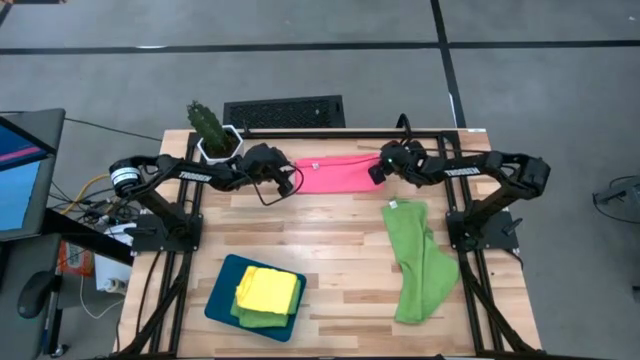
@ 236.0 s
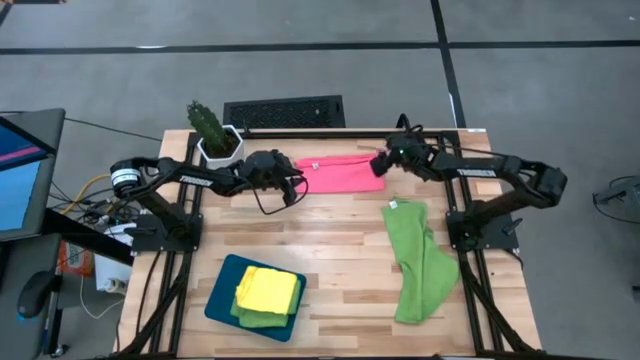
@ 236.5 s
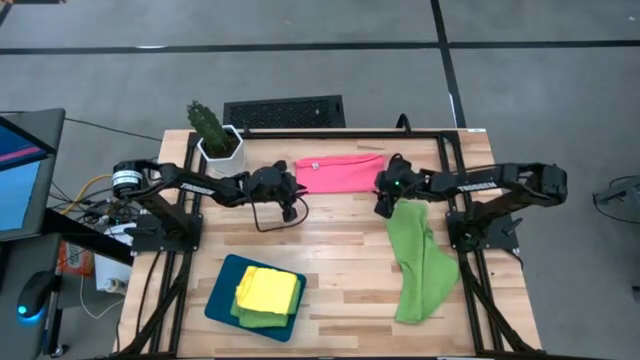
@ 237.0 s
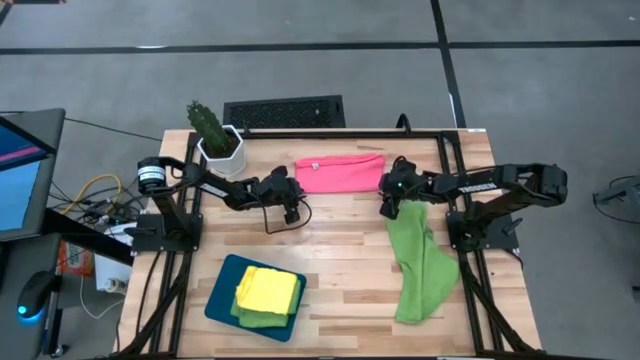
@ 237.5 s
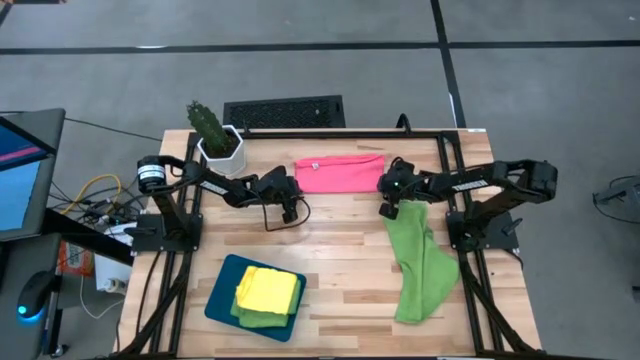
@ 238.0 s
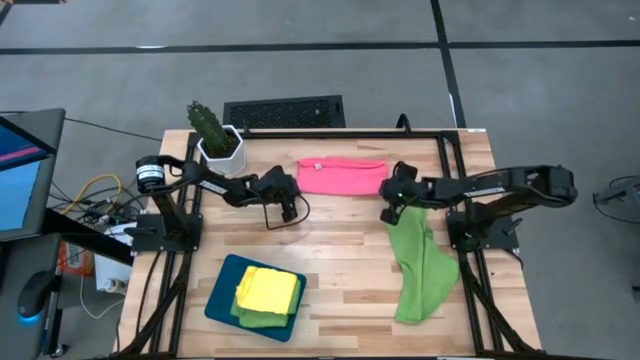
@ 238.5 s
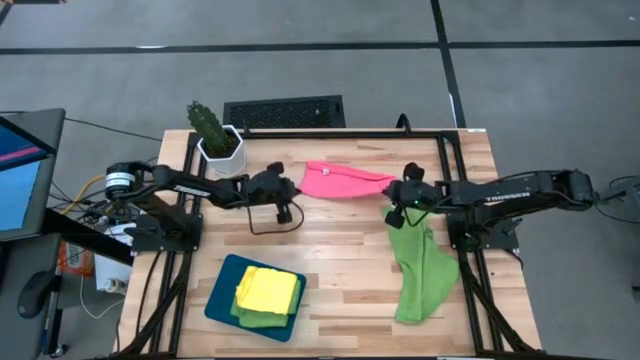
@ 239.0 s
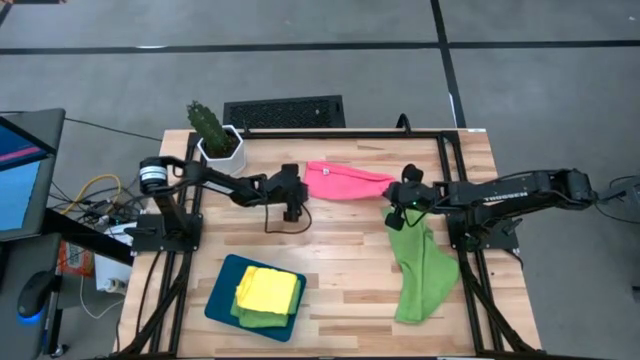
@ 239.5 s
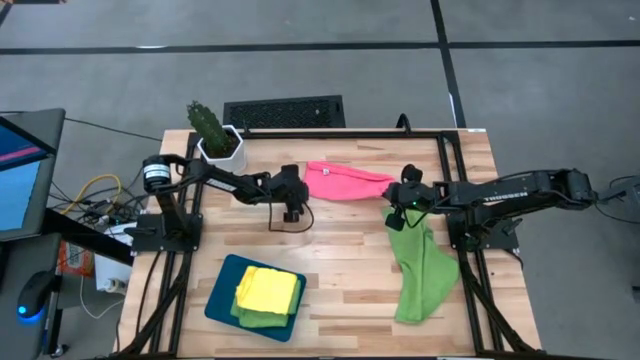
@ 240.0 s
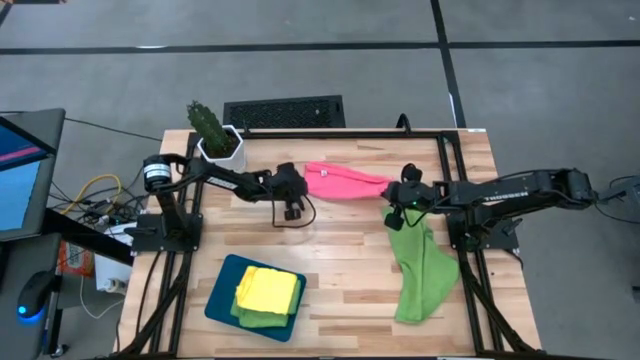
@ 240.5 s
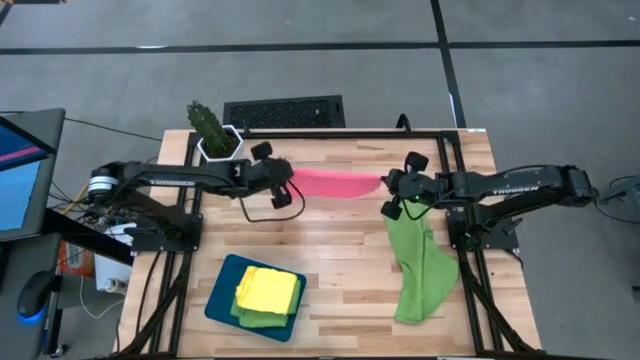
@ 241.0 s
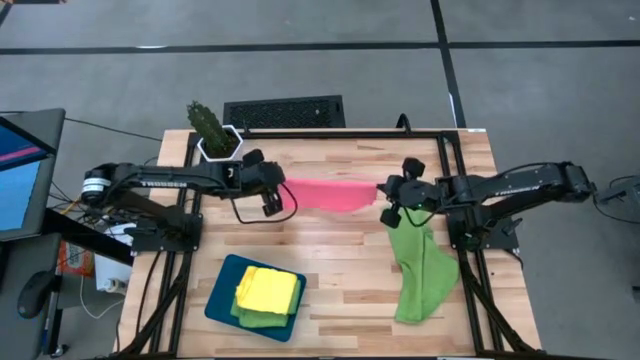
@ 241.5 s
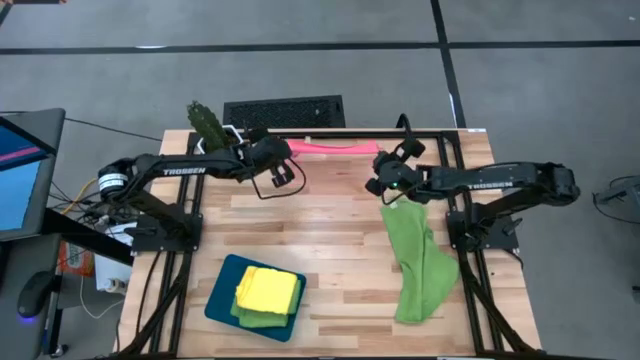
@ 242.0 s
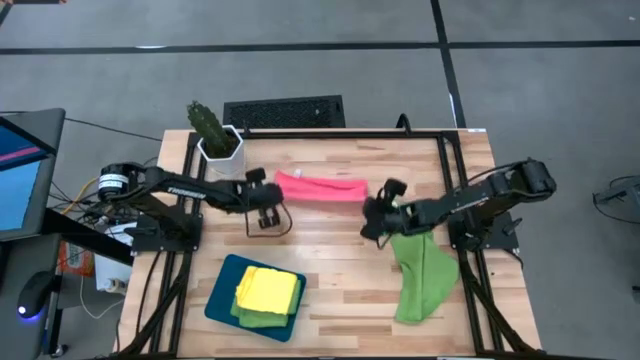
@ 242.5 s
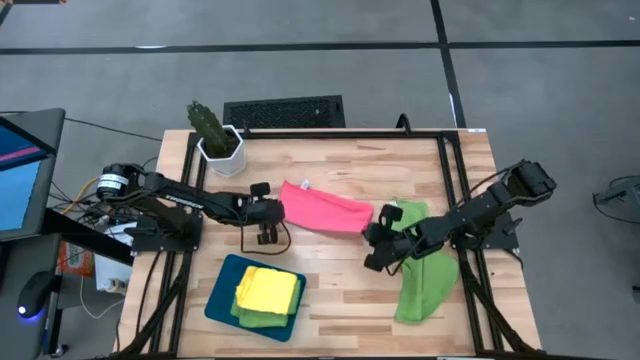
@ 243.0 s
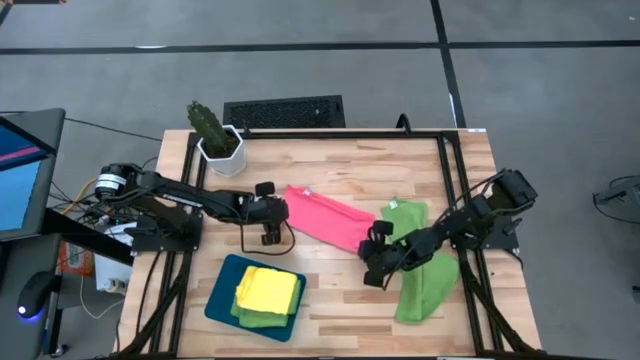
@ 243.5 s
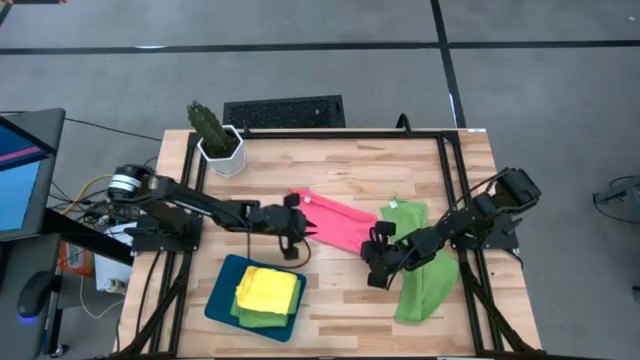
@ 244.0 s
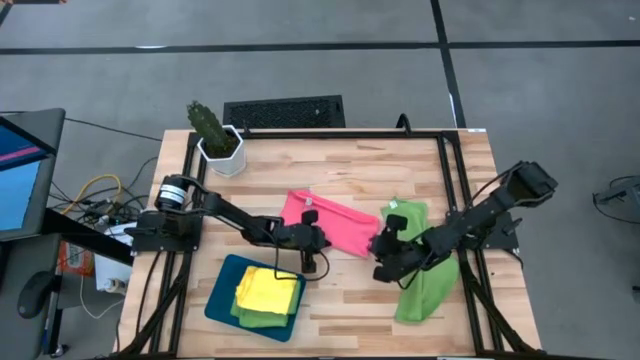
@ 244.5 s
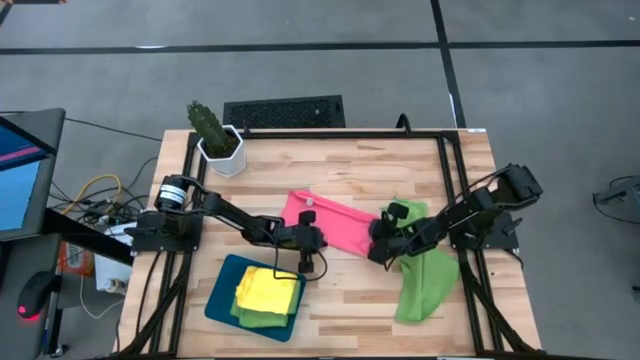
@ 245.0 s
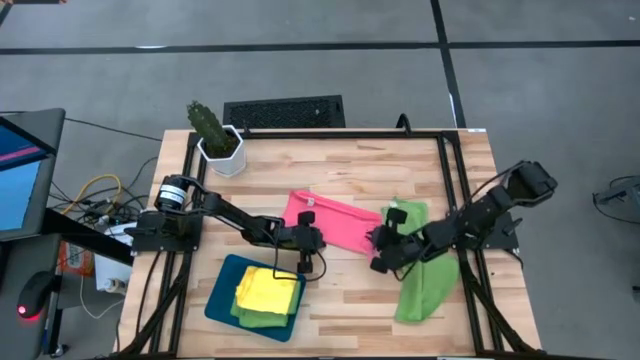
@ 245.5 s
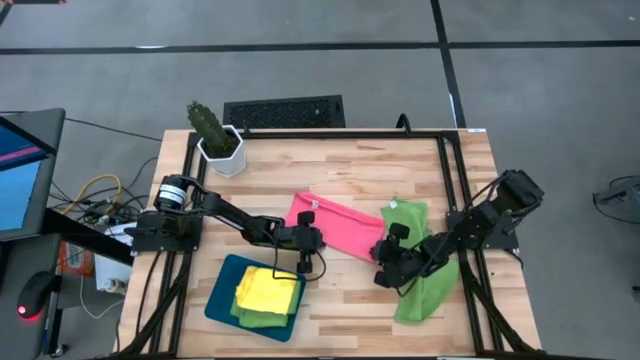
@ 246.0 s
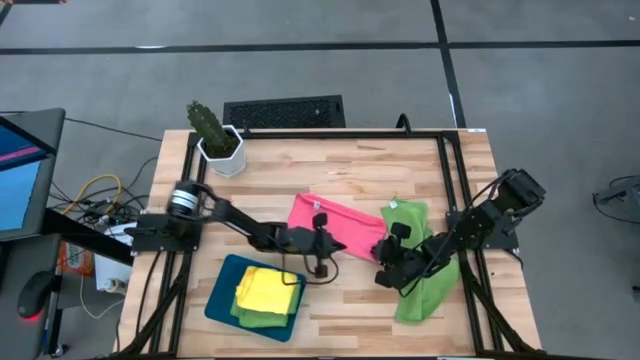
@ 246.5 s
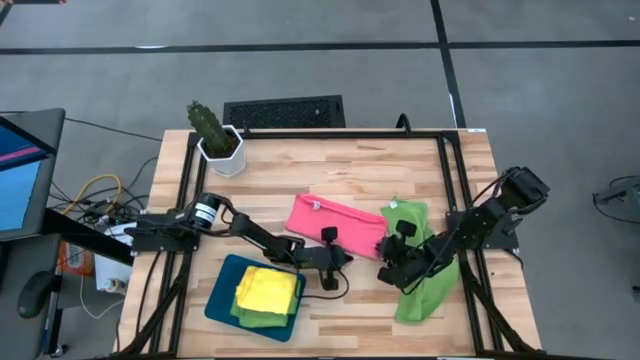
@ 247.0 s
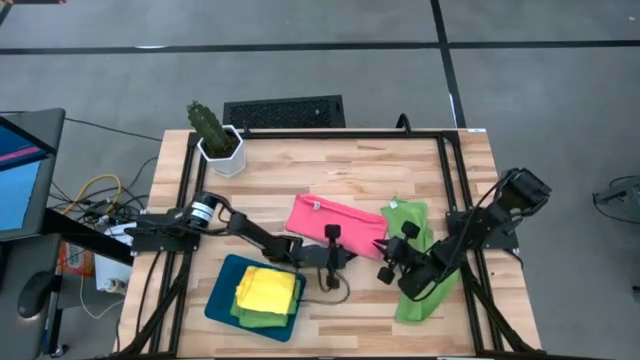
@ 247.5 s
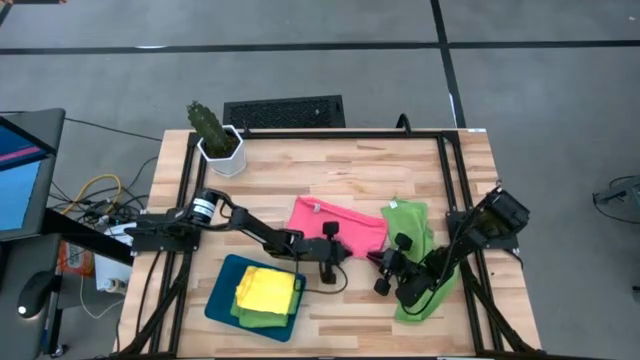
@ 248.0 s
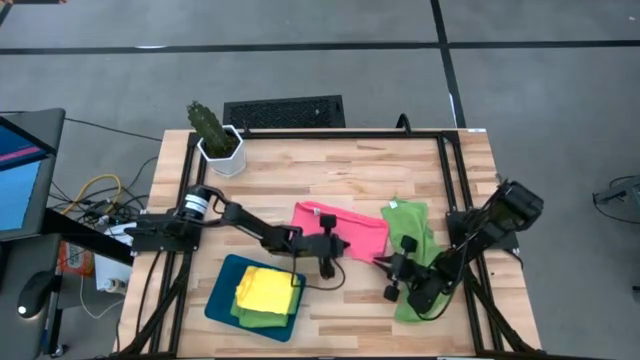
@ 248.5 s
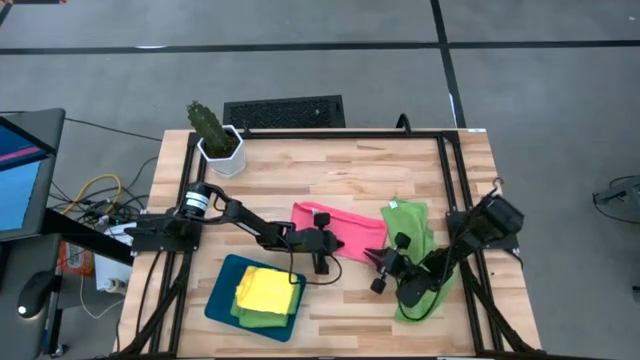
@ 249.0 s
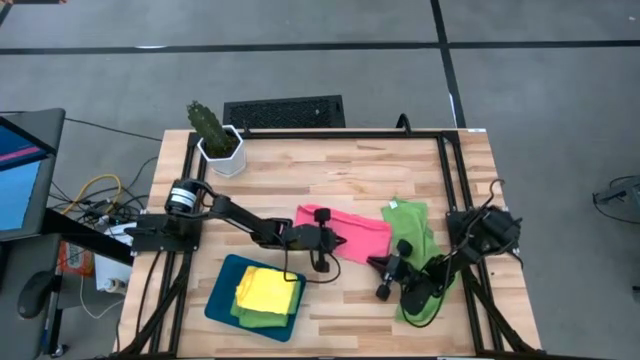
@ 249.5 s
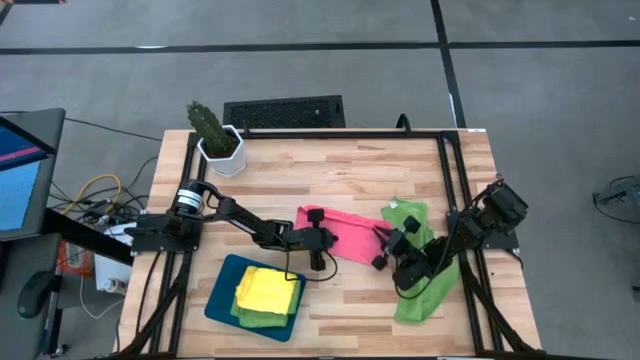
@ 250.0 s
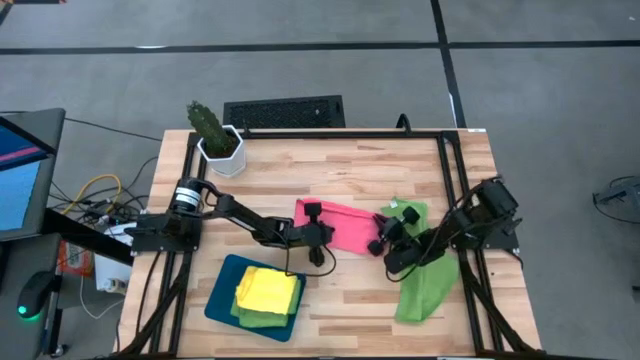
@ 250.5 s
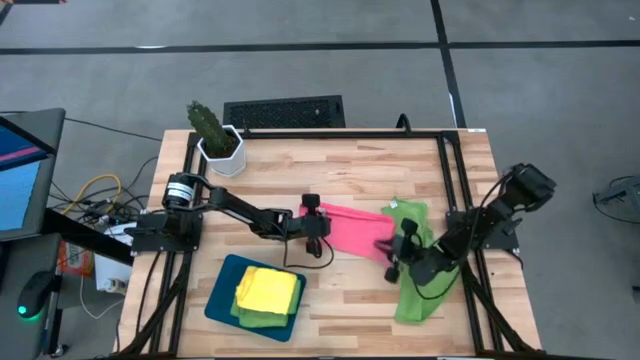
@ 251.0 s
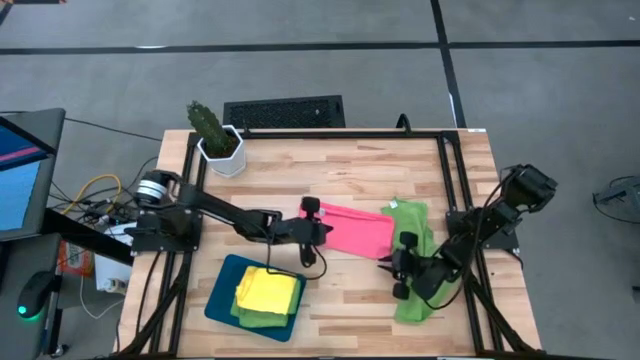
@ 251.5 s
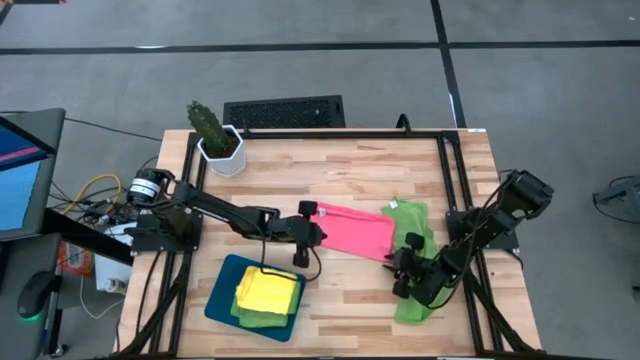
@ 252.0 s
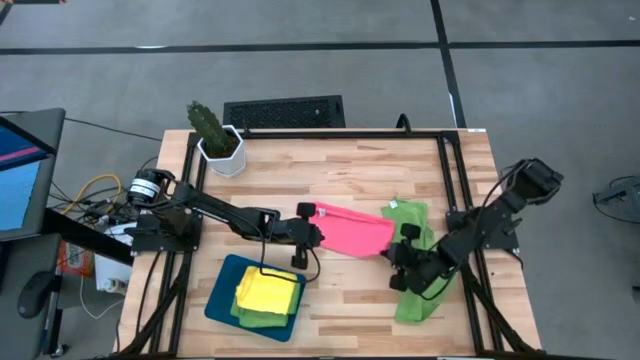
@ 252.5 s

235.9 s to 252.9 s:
Task: Fold microfiber towels
Fold the pink microfiber

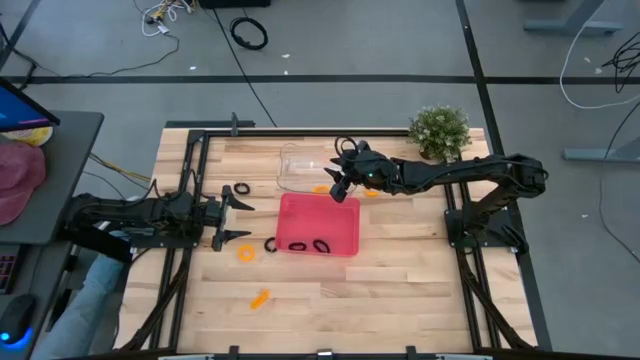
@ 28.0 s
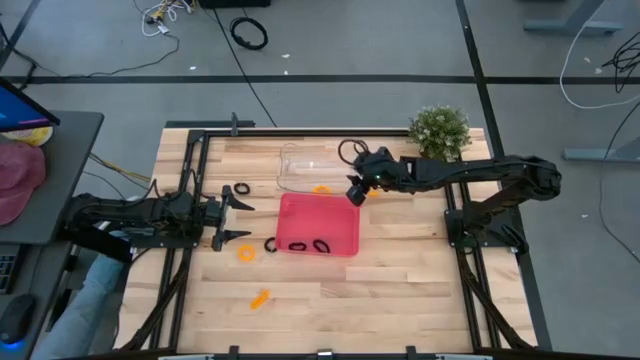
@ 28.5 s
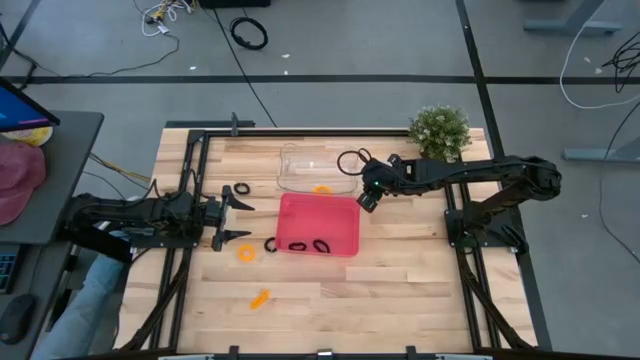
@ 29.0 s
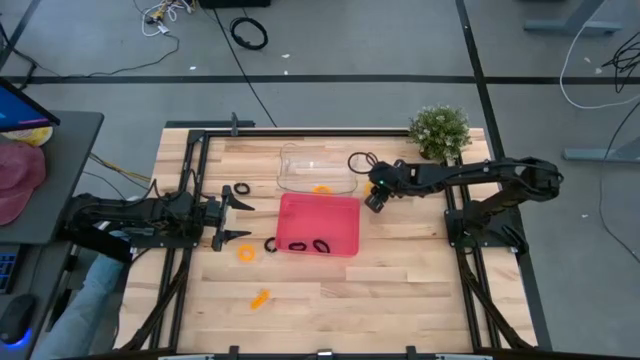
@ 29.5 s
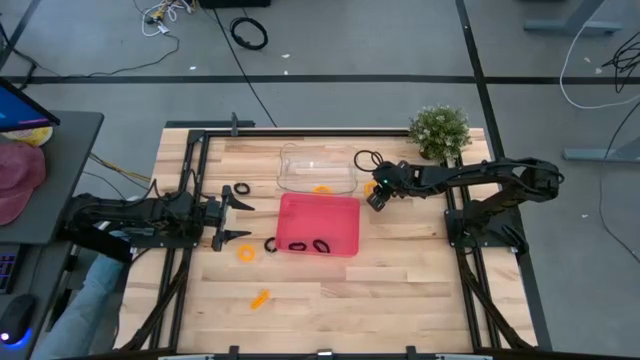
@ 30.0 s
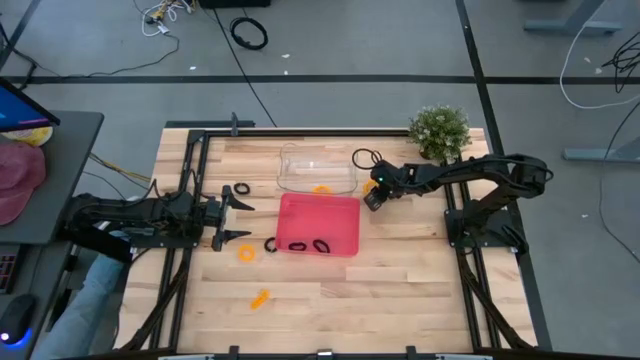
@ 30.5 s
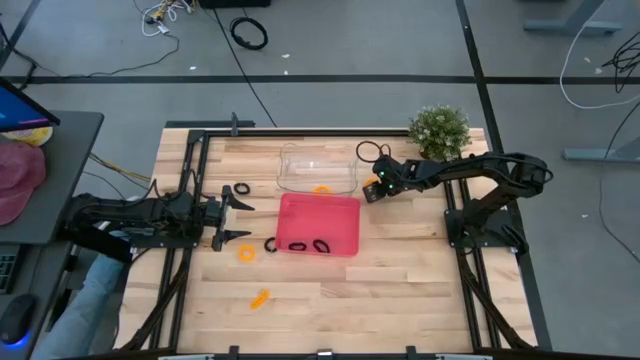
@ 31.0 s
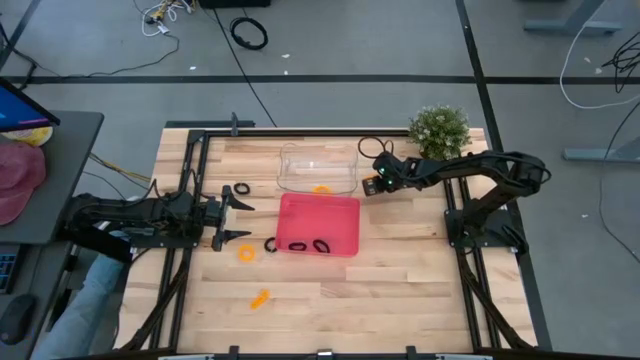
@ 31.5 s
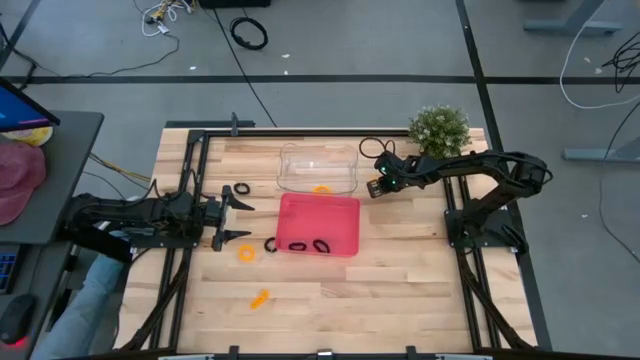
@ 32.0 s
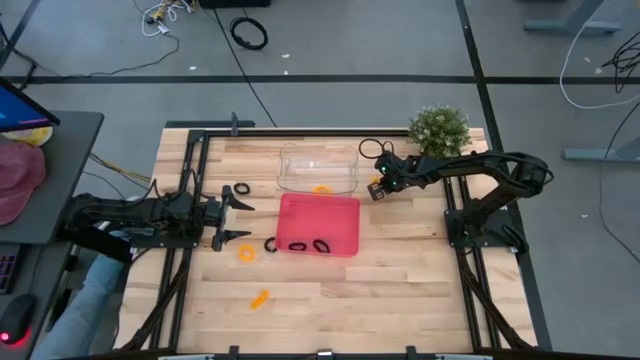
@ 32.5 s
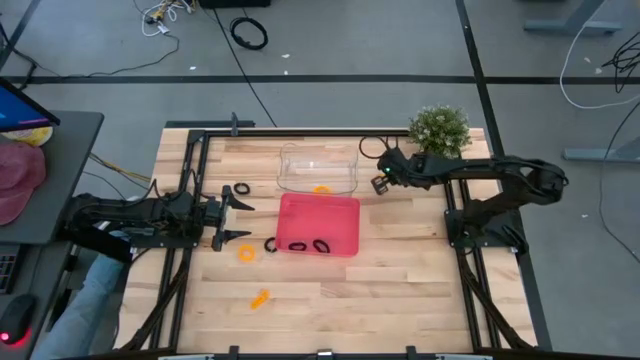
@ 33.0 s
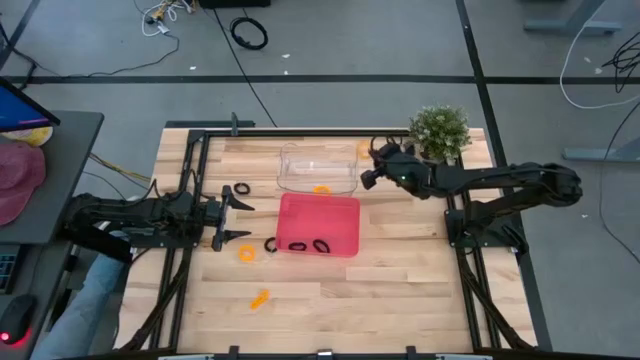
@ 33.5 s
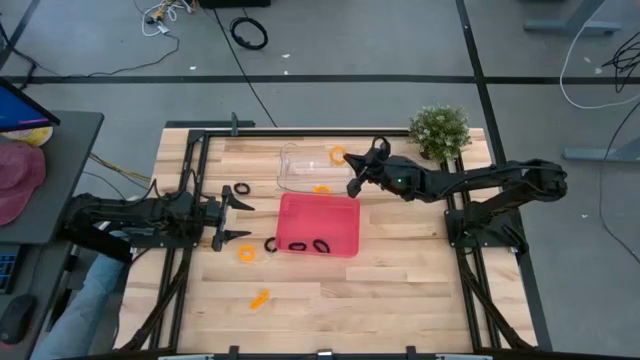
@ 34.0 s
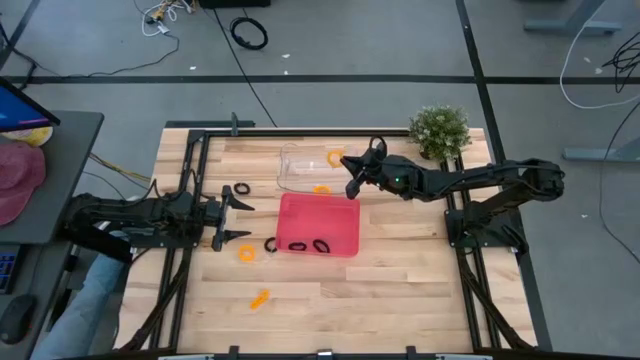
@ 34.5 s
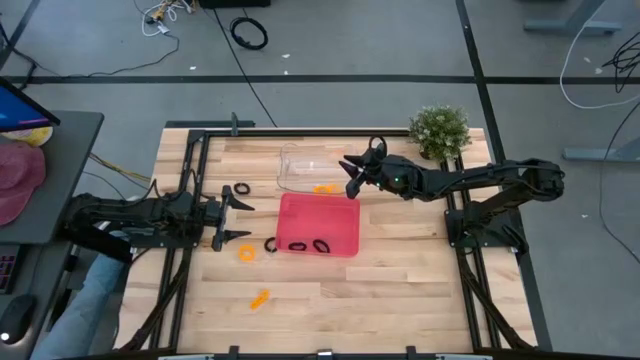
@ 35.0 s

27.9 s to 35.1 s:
Task: Sort spring keychains
Put the orange spring keychain into the transparent bin
